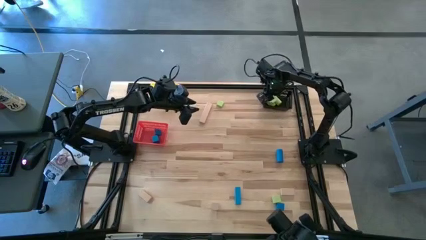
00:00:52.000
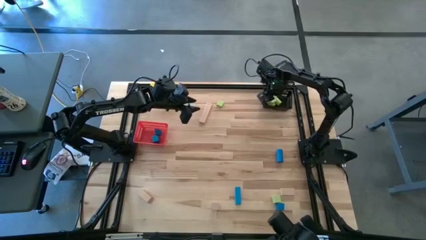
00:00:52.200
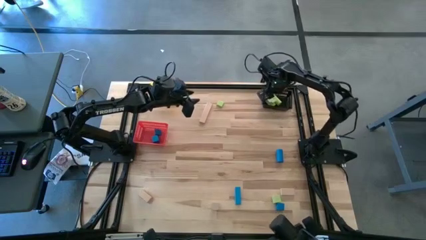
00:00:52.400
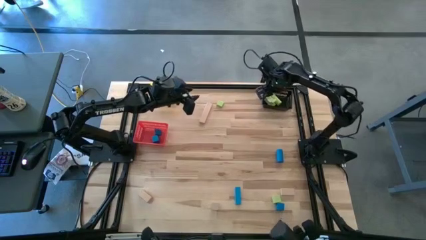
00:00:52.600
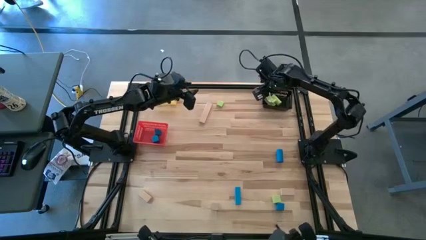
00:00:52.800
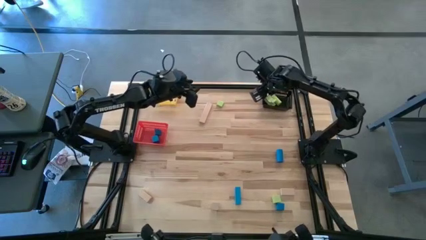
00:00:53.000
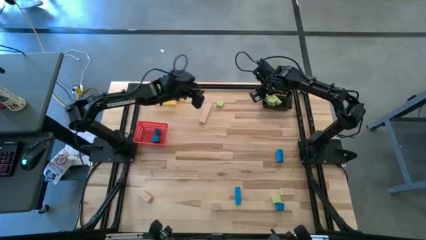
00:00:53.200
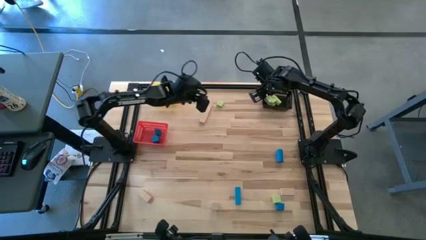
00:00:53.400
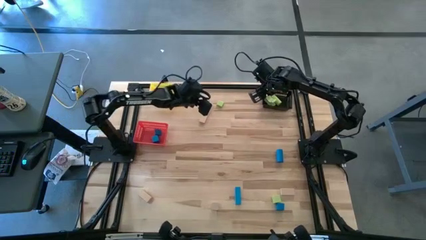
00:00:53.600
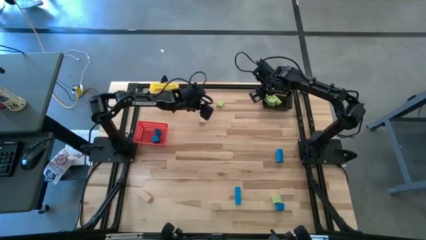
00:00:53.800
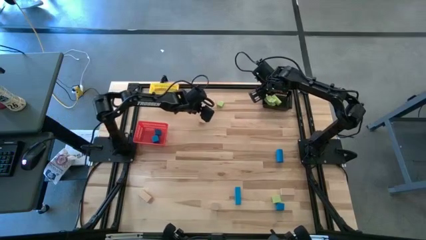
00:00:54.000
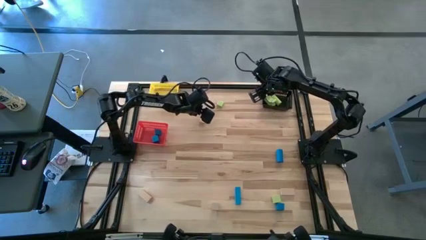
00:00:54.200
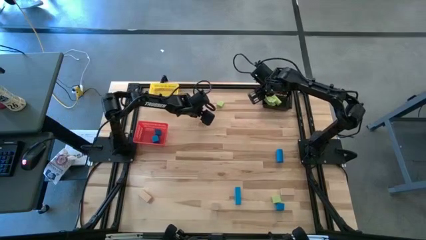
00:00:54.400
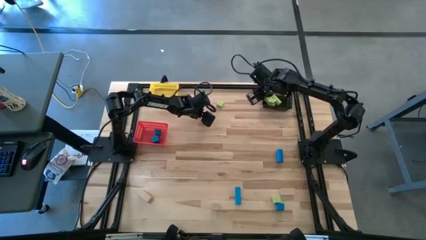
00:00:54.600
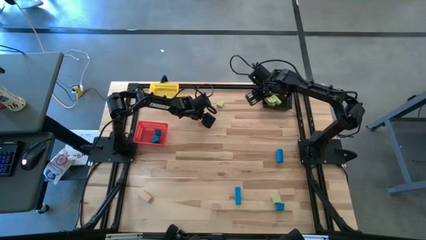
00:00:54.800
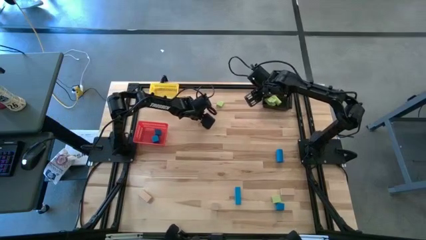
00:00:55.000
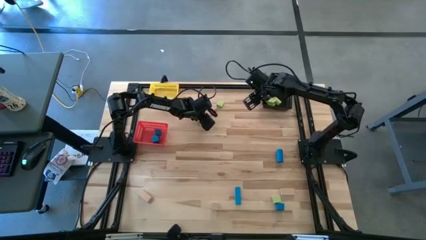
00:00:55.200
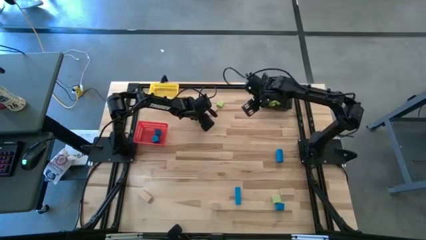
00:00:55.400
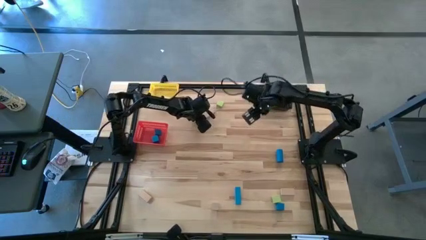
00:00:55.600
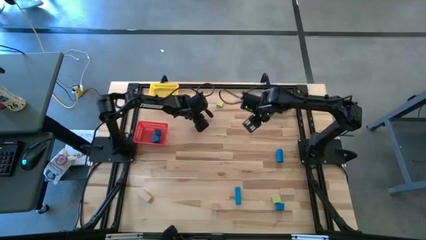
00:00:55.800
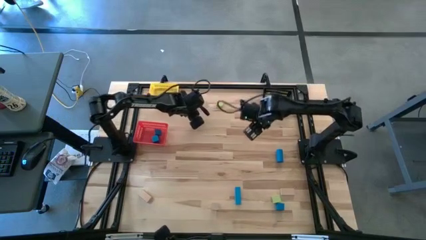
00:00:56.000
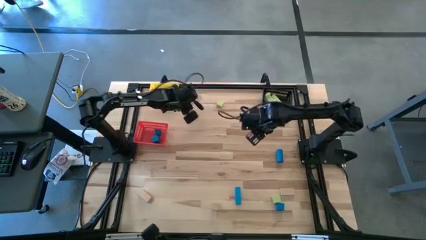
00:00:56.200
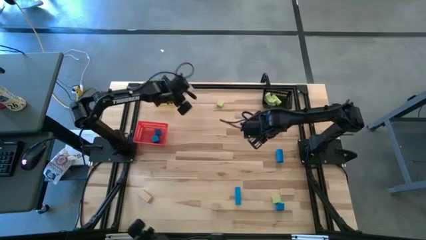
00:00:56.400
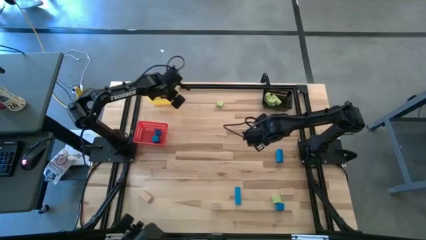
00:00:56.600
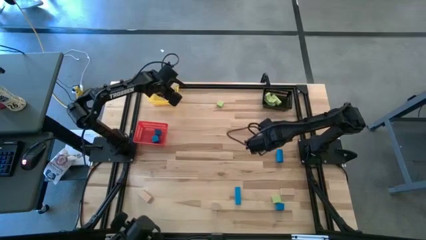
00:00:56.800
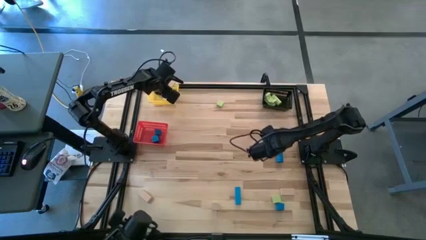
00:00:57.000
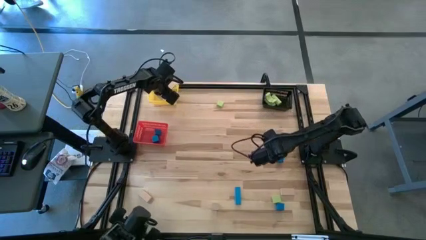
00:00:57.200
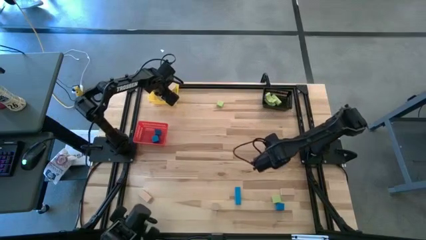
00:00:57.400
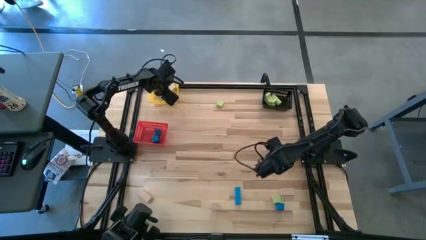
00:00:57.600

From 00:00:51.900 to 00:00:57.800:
Task: Sort & place blocks by color
Put the brown block into the yellow bin

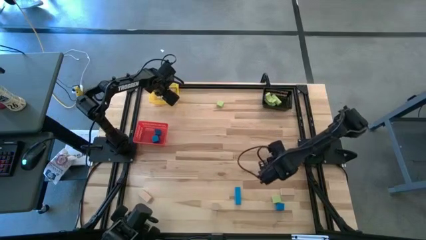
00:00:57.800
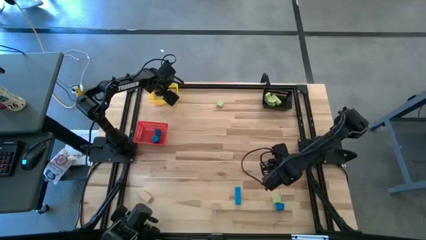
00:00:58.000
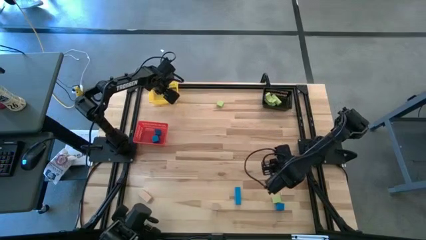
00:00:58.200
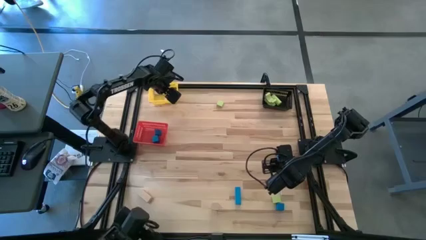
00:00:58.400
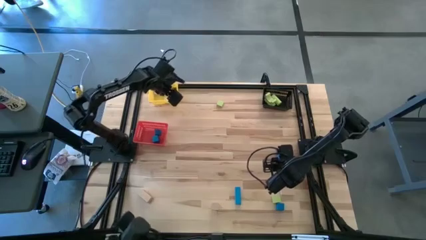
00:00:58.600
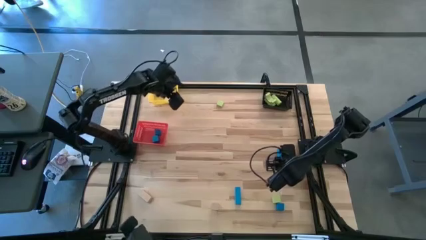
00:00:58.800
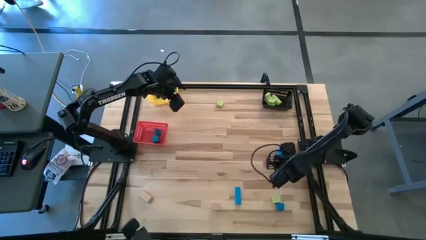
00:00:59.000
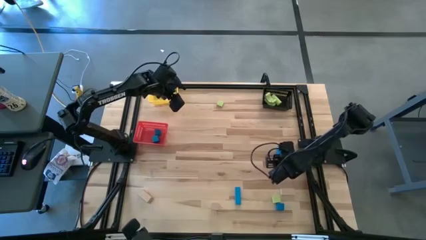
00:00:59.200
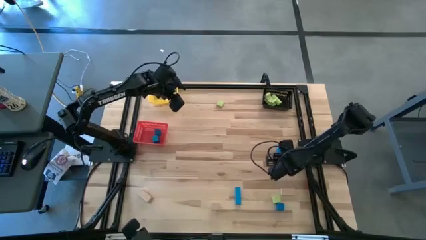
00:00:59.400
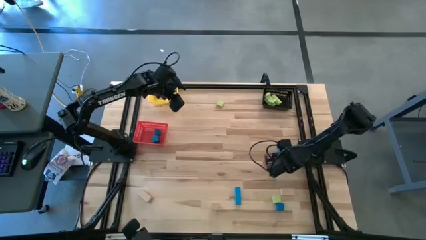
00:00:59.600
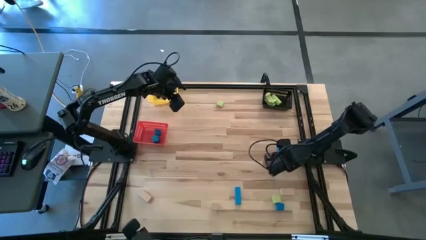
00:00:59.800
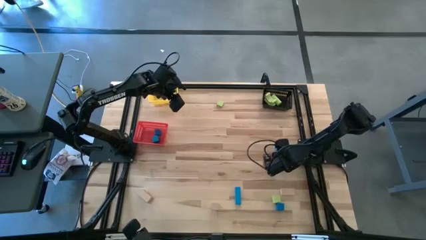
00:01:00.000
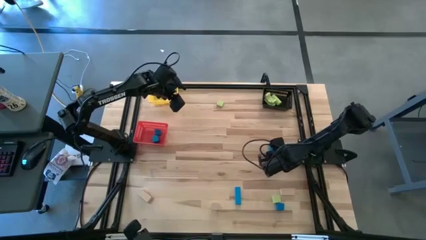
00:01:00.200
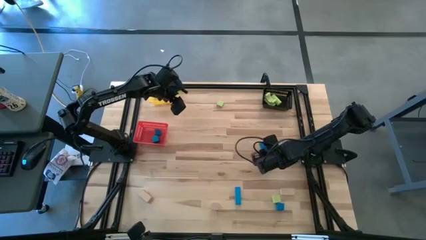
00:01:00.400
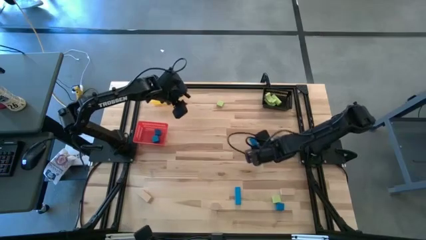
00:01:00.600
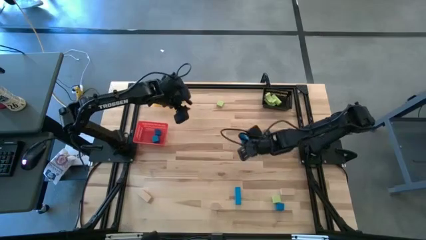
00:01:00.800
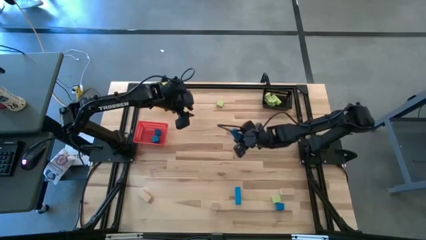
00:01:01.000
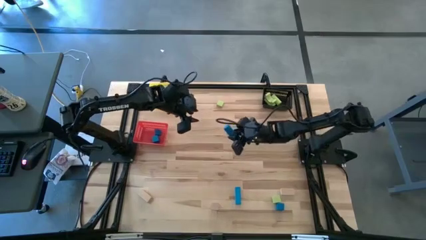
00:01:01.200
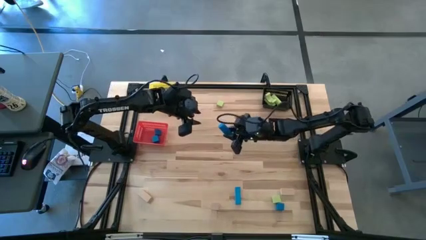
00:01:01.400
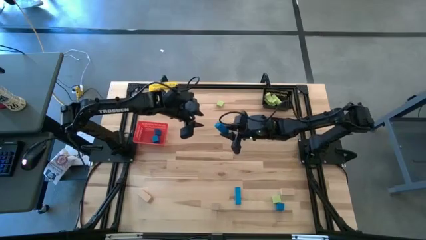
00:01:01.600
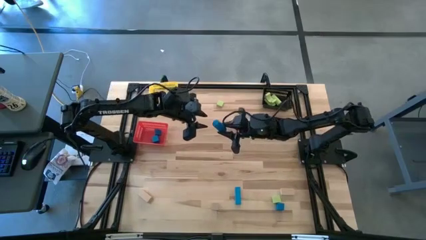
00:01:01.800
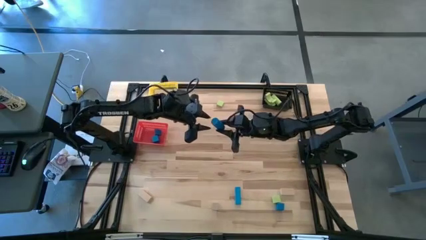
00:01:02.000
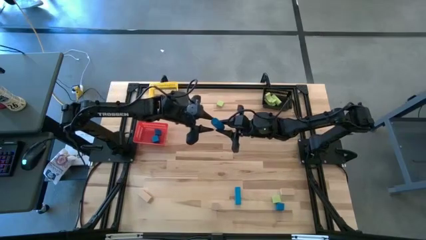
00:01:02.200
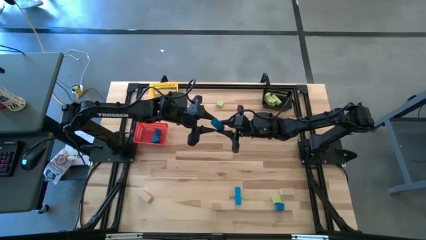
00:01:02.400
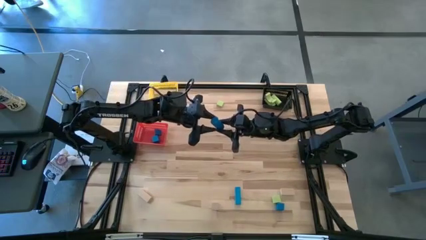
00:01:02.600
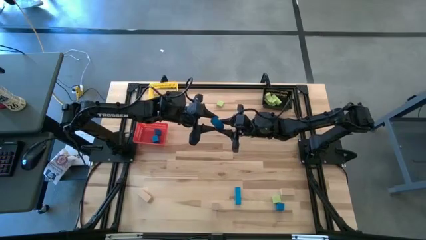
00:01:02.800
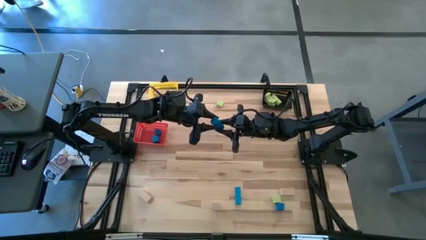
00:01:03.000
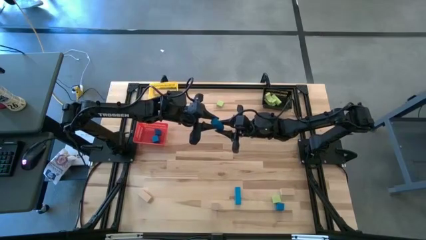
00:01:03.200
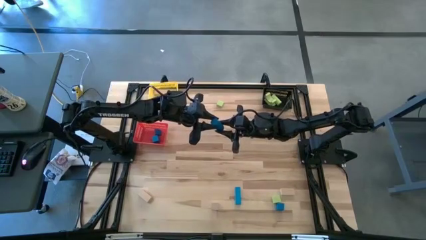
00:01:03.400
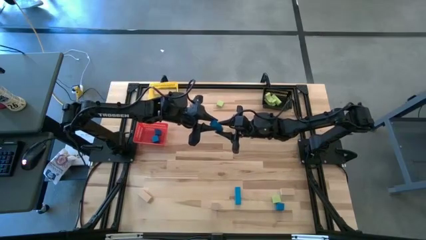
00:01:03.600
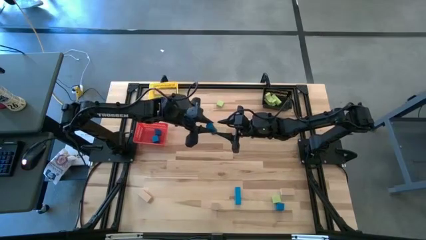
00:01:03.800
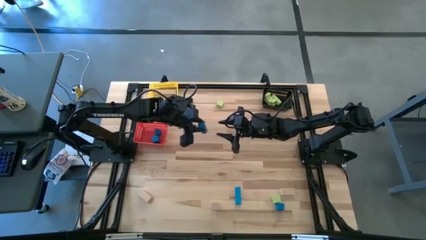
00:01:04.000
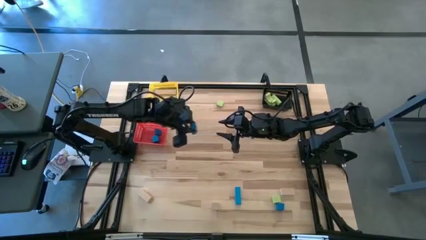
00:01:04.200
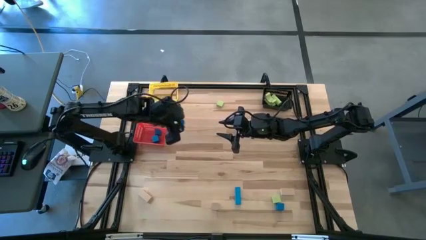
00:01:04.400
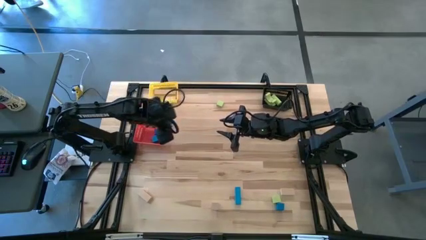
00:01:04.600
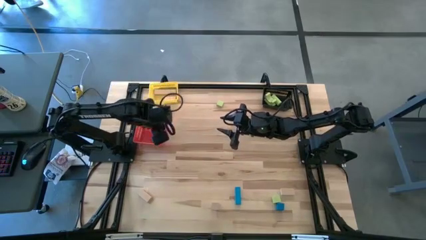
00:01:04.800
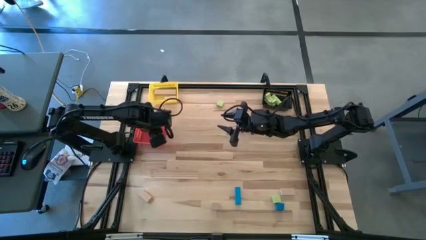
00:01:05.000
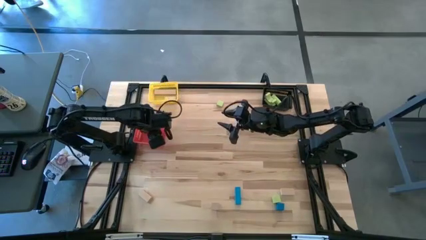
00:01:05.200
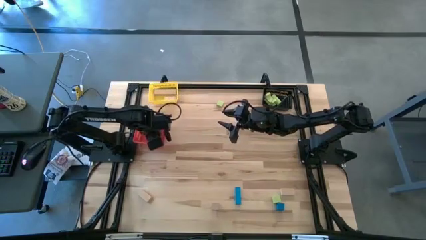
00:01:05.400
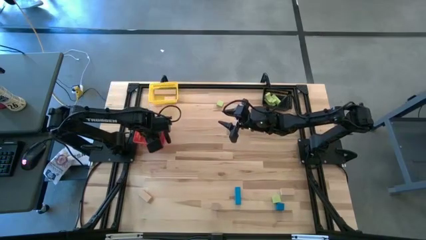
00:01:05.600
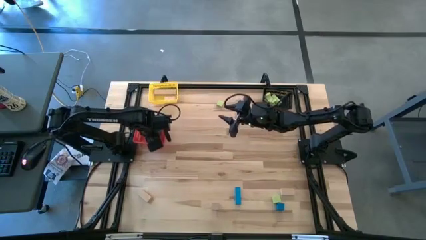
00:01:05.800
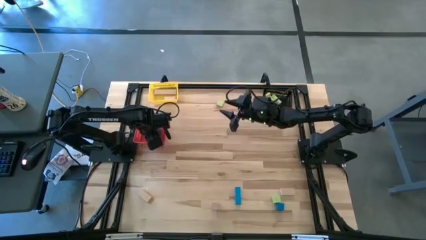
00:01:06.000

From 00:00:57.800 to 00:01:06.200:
Put the blue block into the red bin

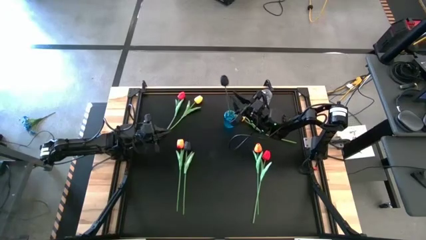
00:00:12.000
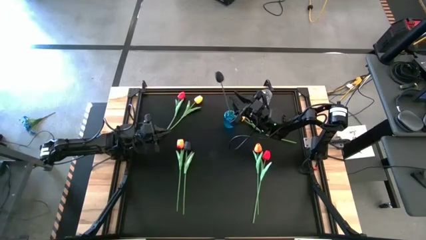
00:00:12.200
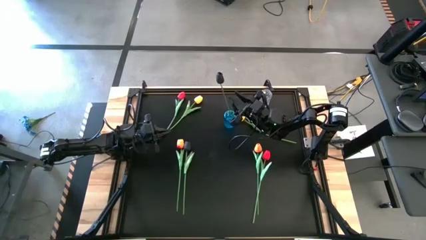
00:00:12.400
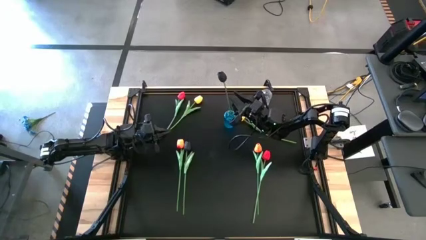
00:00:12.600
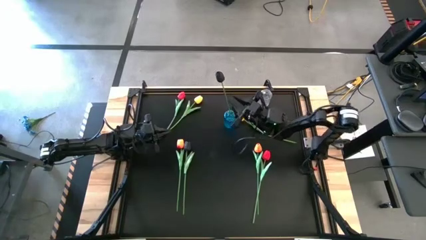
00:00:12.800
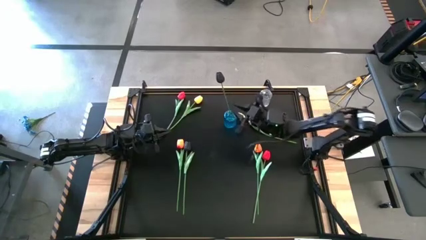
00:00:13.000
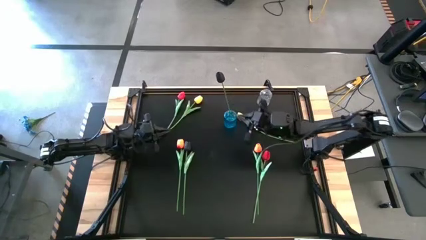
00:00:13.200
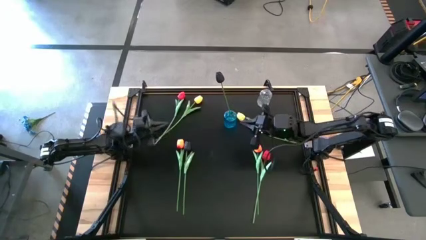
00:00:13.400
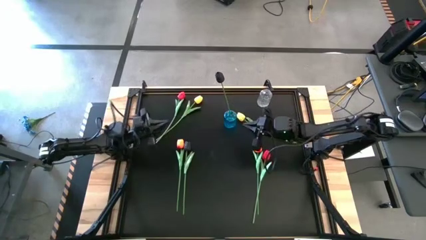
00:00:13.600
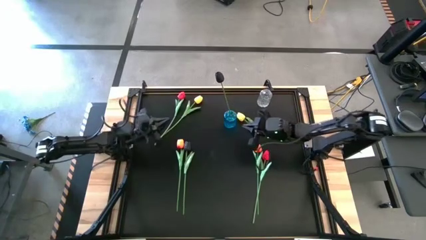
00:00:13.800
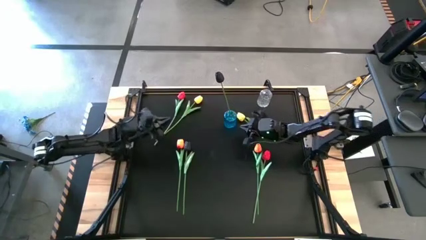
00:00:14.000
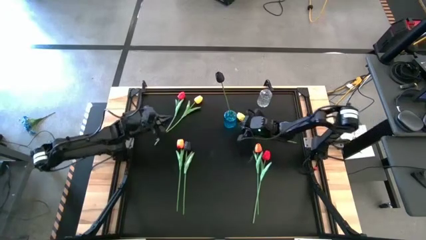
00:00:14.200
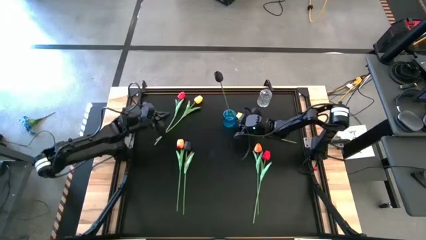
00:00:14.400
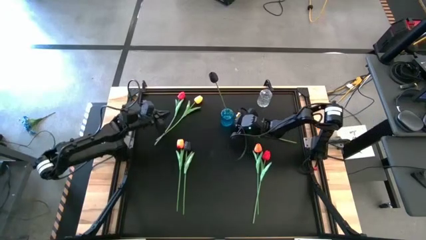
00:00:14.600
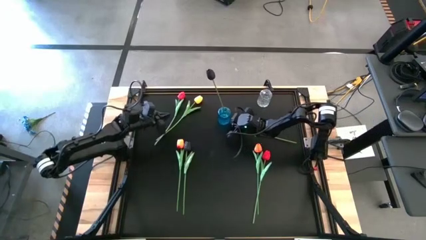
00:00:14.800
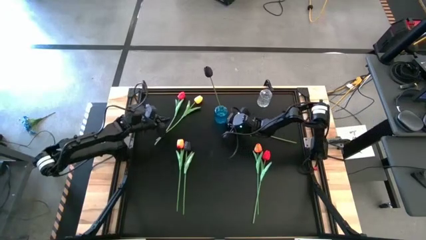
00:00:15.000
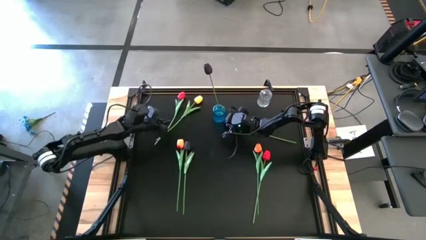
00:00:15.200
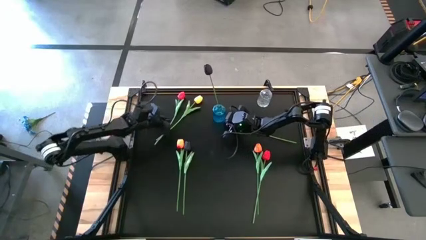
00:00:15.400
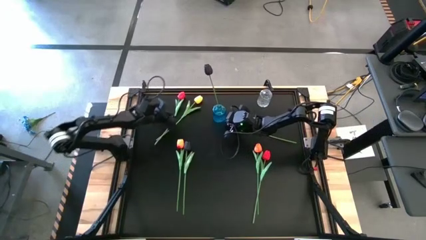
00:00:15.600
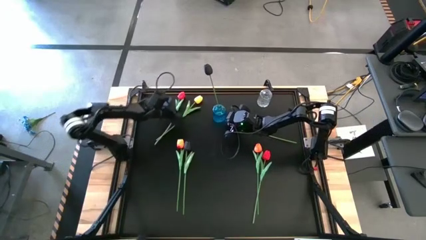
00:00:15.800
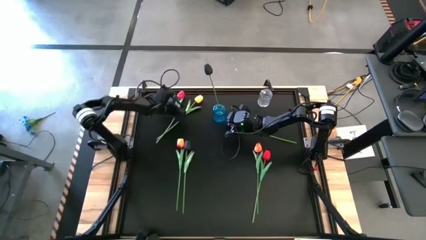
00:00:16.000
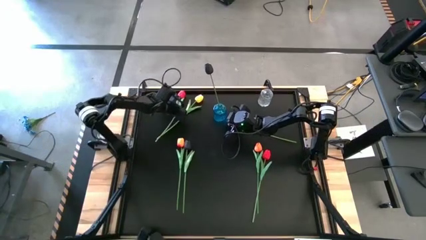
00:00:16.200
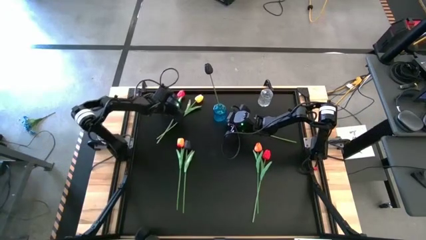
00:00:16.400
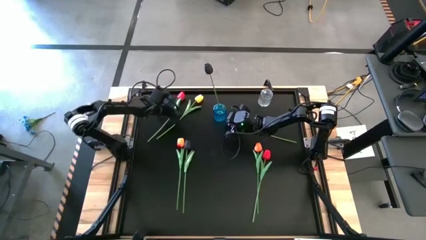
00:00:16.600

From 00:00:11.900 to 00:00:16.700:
Task: Sort flowers into vase by color
Adjust the blue vase
